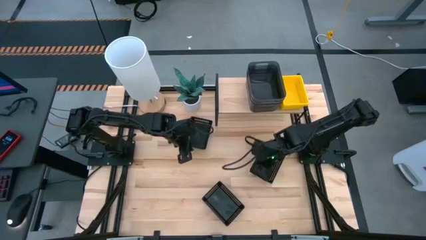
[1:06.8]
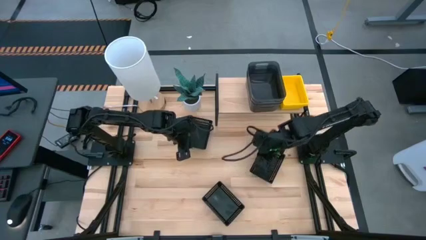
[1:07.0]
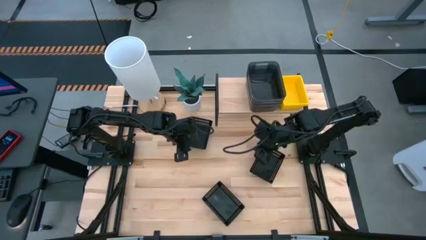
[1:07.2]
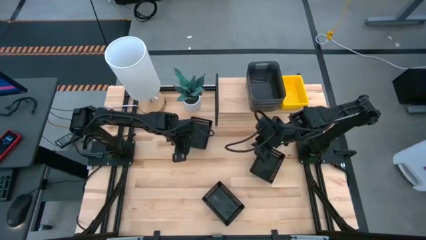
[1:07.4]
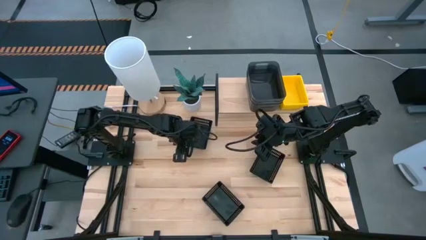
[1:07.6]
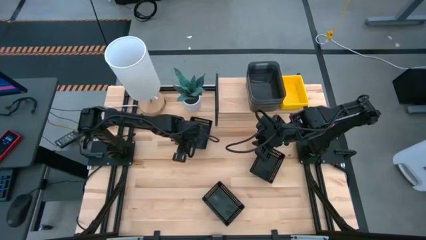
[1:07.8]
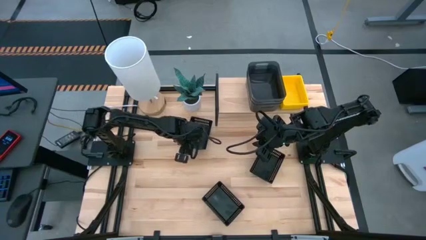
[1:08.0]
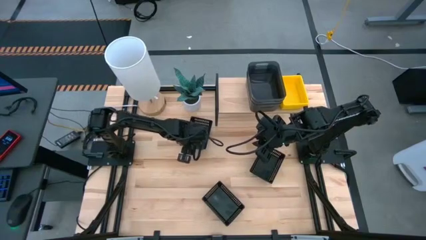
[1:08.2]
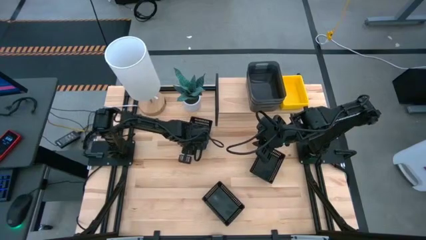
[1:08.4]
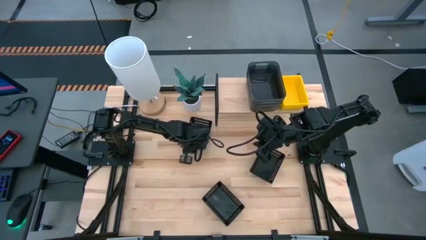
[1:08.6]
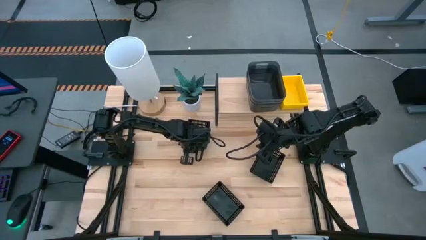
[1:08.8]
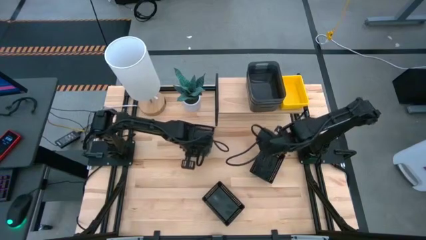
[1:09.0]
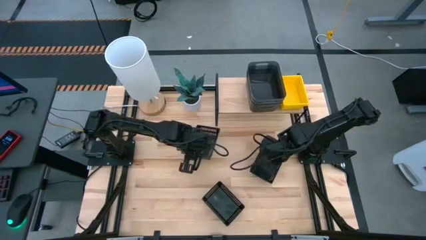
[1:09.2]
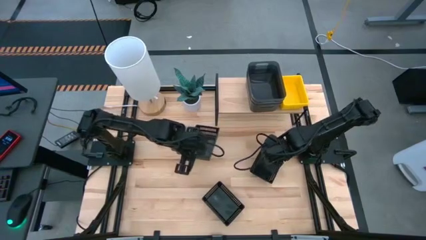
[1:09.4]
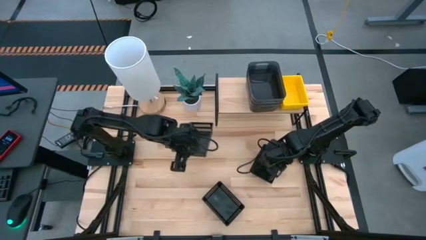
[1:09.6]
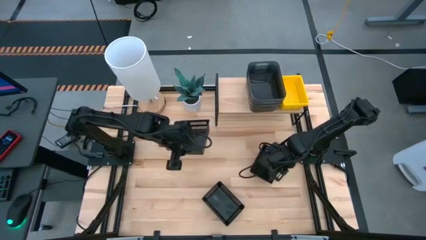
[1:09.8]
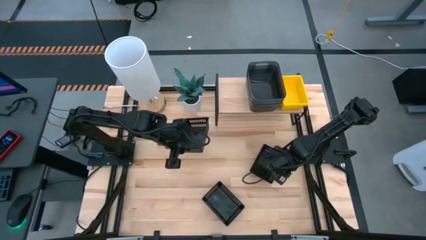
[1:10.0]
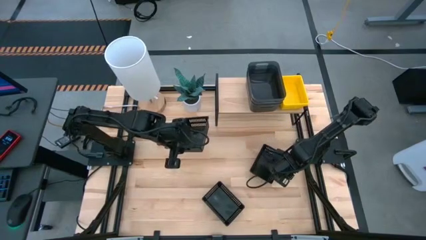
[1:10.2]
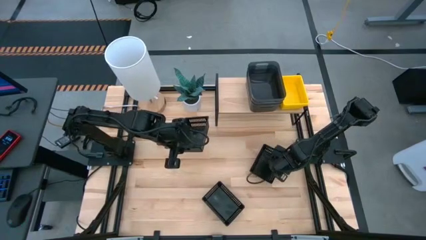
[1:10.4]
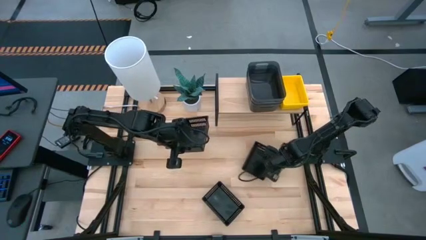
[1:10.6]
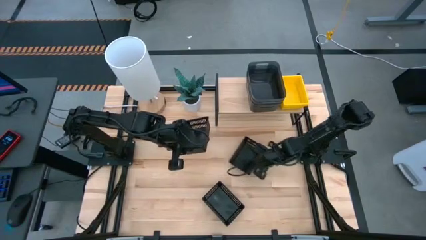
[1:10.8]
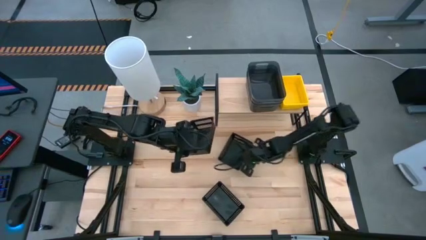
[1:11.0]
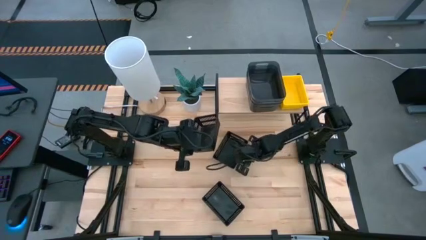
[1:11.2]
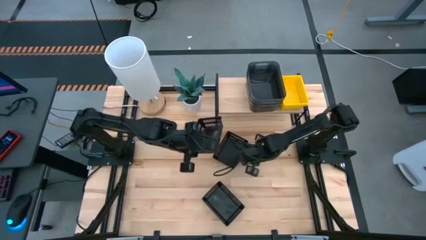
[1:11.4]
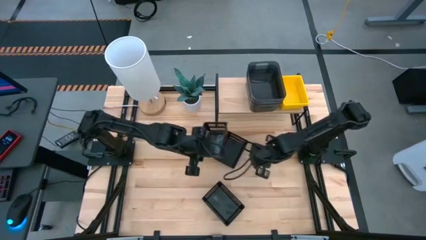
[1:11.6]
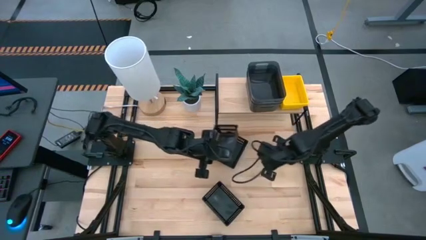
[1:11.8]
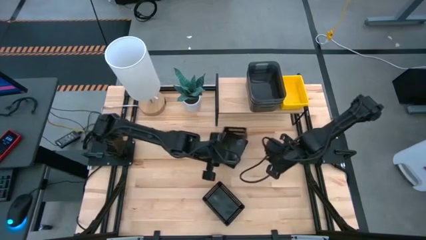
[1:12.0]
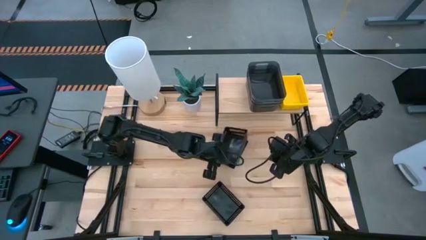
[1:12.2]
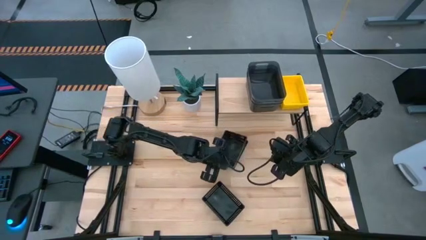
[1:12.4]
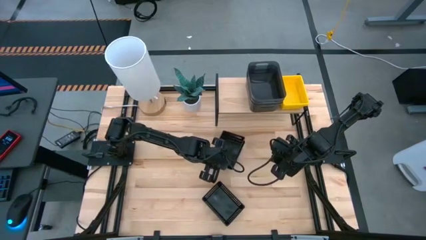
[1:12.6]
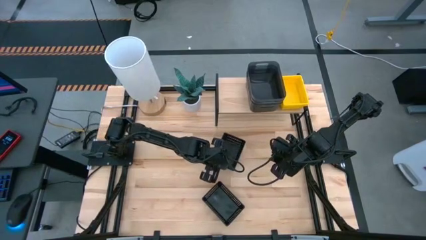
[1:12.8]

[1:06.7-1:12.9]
Task: Stack baskets on shelf by color
Stack the left black bin on top of the right black bin

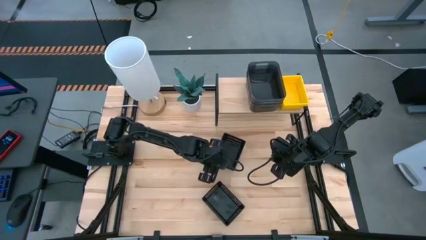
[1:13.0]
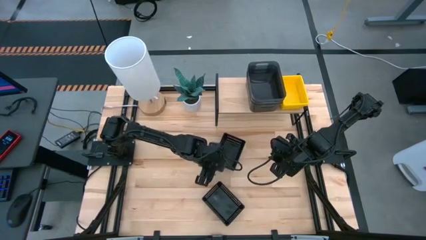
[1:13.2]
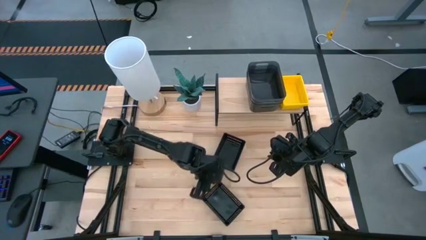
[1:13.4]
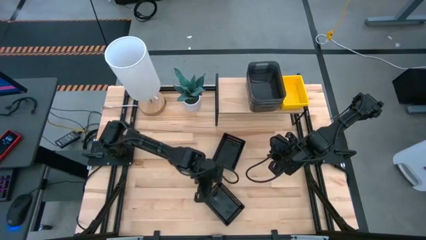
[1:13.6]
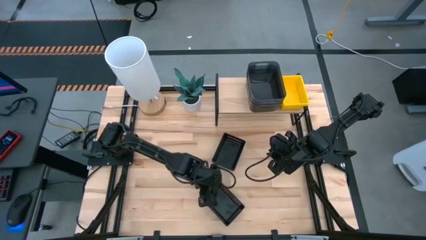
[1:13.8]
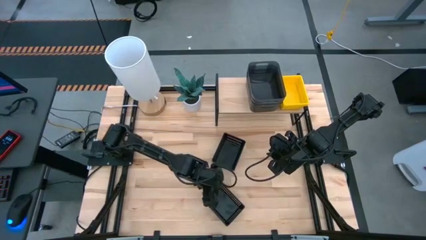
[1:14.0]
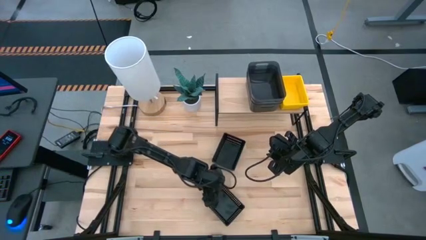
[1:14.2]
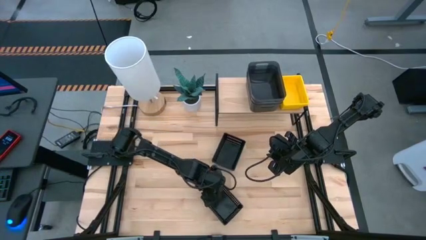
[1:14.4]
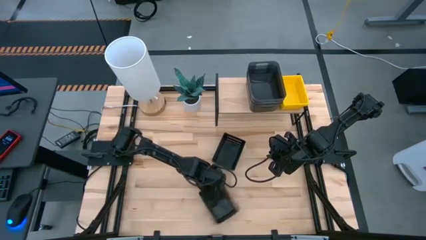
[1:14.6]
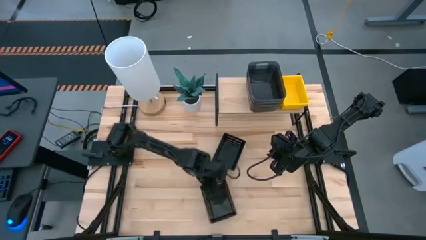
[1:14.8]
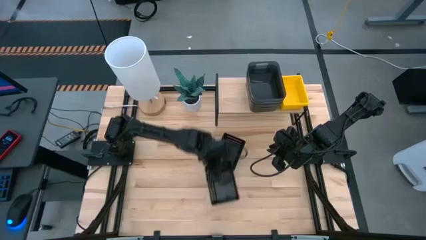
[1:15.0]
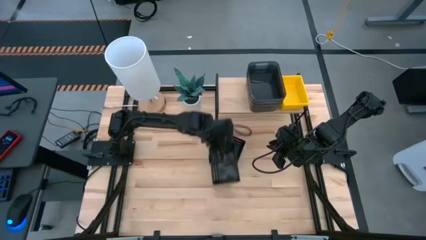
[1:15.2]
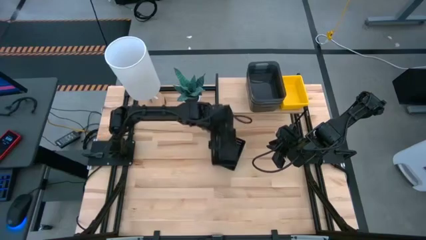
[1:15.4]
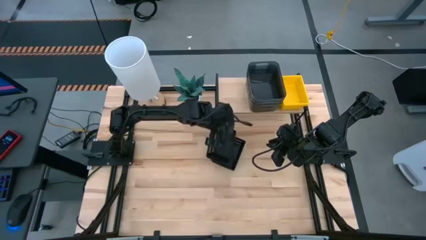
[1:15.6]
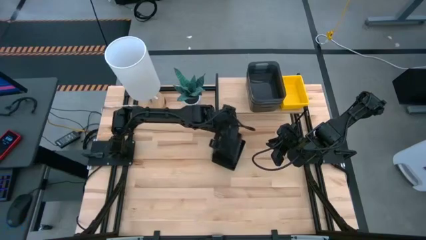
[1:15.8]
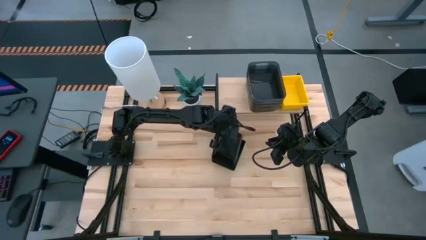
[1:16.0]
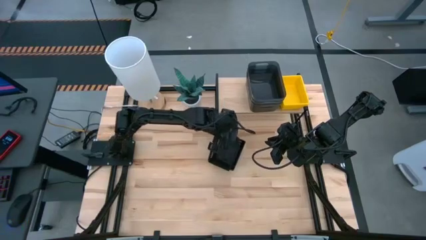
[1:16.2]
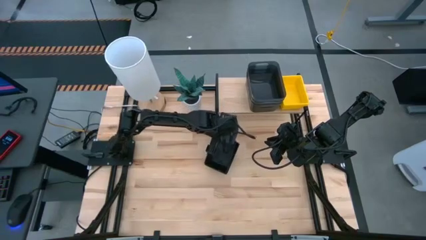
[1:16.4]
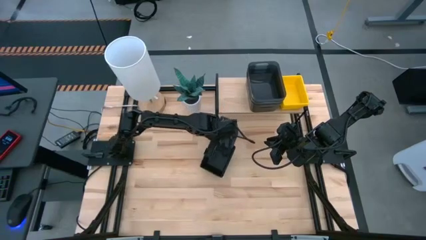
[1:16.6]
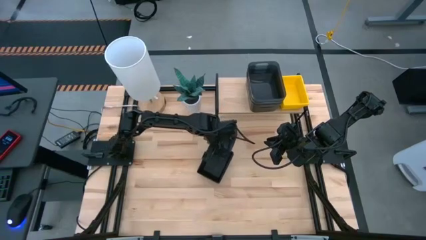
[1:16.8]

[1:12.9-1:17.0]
Stack the bottom black bin on top of the top black stacked bins

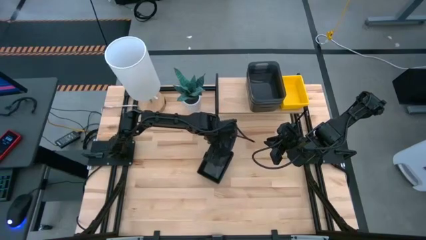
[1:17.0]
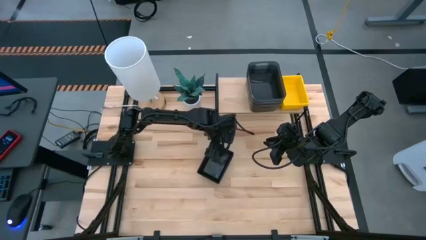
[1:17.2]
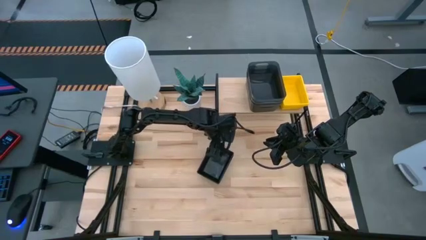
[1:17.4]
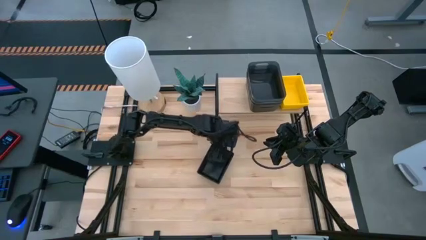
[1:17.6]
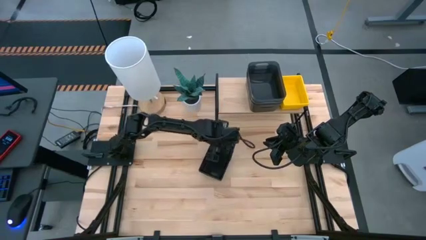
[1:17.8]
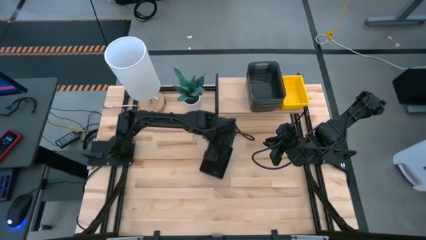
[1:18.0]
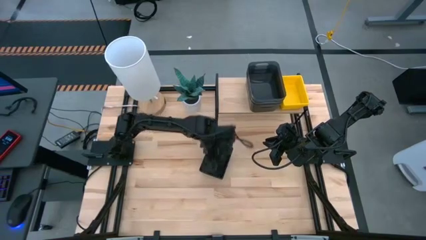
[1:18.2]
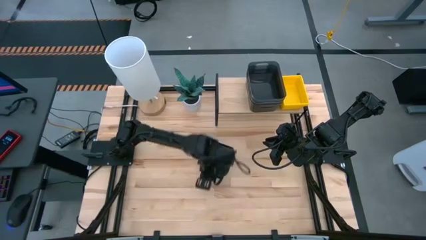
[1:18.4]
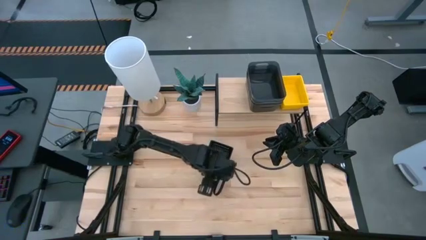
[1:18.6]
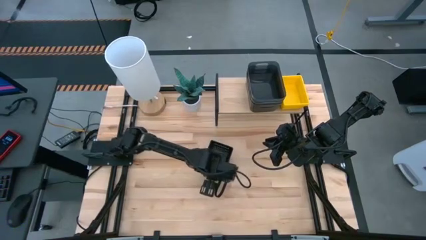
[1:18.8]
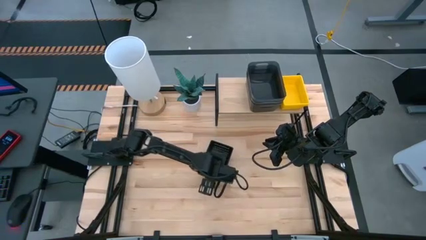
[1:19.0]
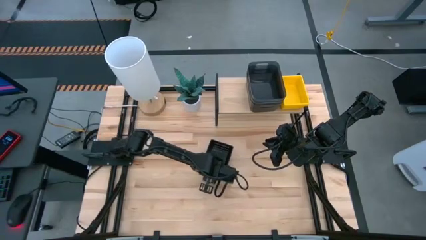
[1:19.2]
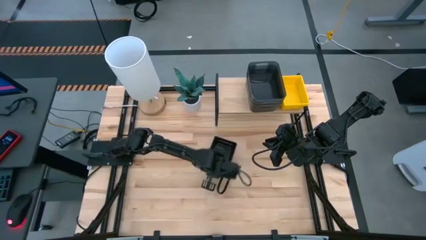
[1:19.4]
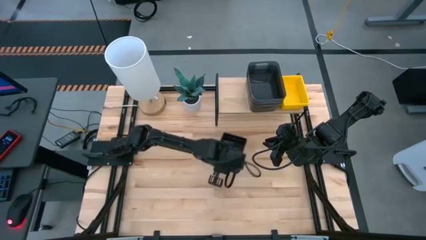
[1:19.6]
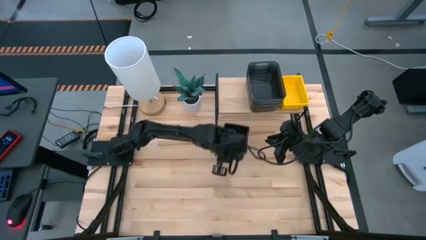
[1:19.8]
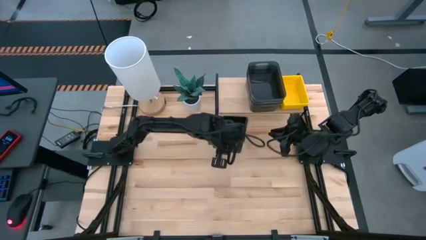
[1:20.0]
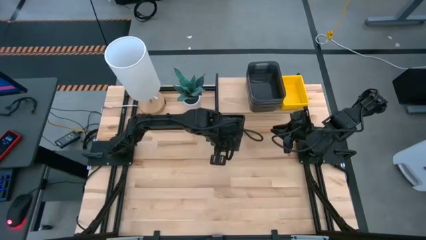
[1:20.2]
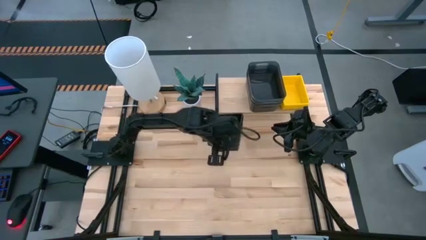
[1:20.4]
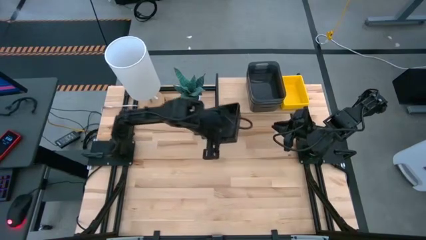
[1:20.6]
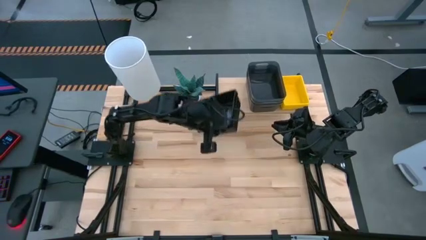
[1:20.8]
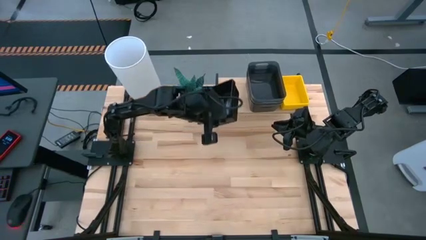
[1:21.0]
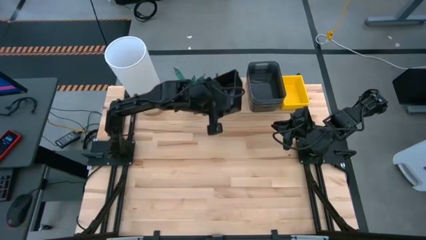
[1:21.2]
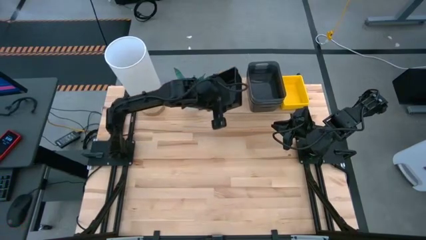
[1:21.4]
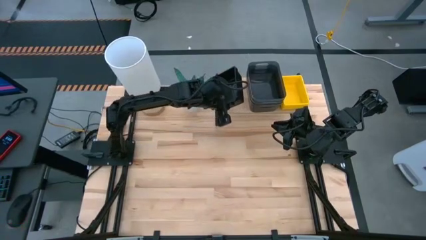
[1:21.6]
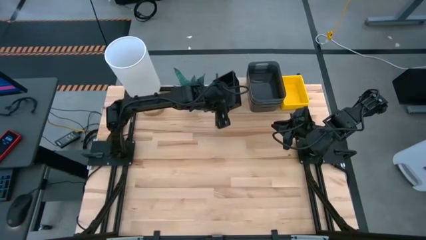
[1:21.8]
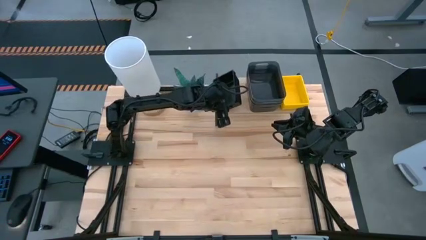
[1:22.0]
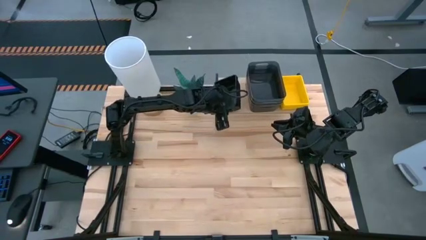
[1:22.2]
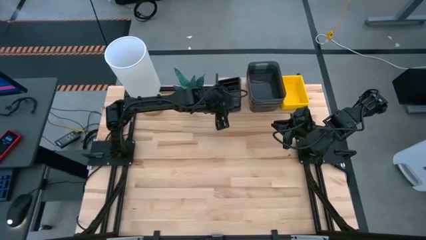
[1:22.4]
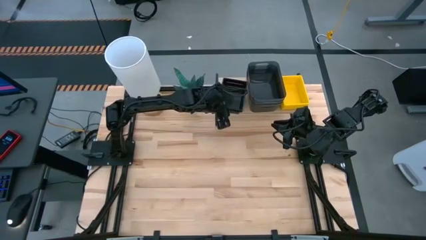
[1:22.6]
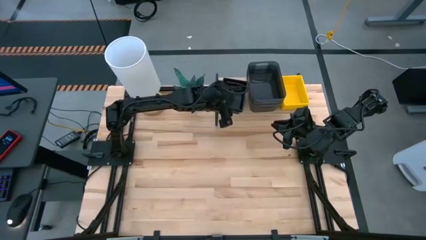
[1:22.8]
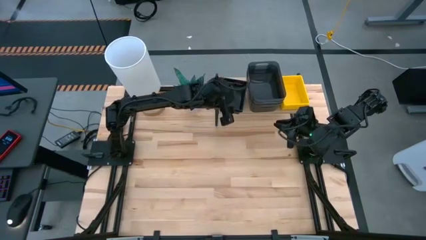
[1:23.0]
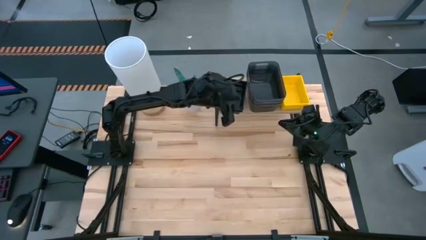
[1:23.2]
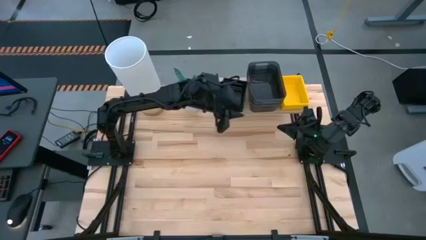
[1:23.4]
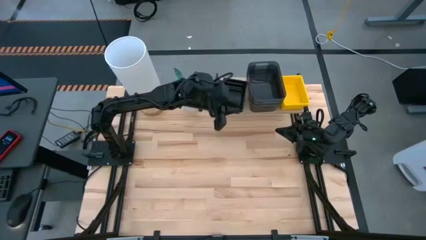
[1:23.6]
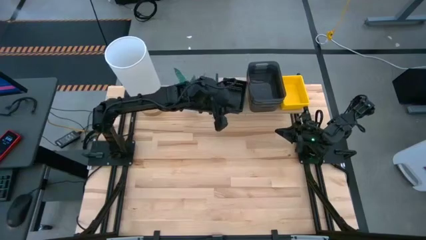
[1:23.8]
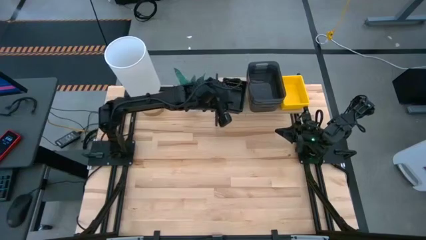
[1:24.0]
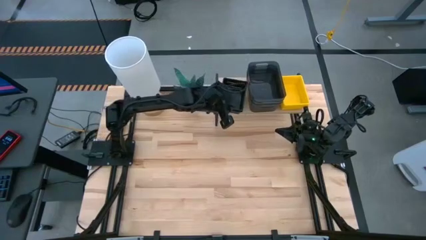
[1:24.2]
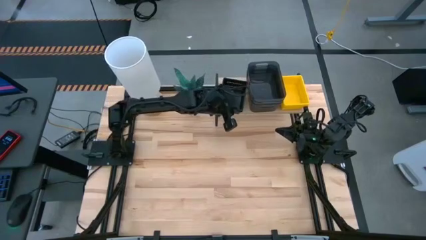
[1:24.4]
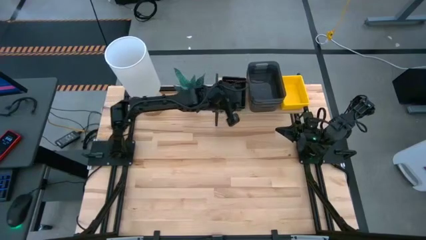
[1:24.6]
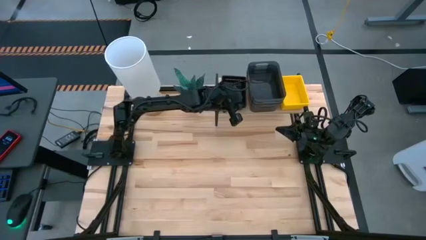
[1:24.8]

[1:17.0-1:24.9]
Put the stacked black bins on the shelf
